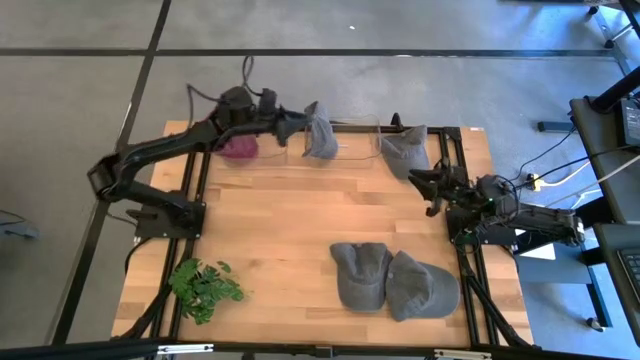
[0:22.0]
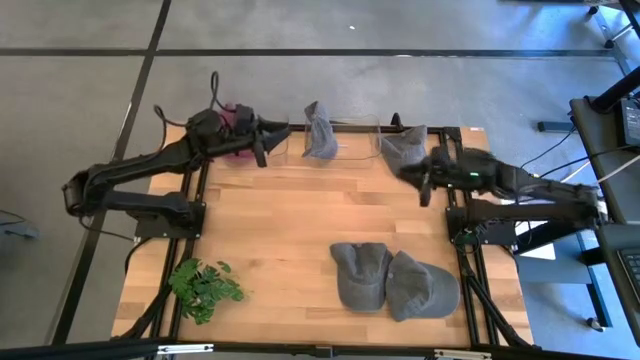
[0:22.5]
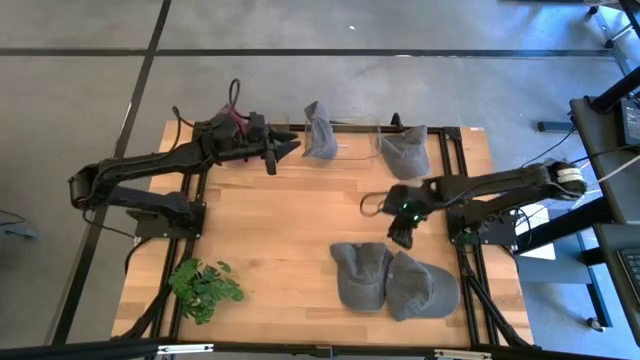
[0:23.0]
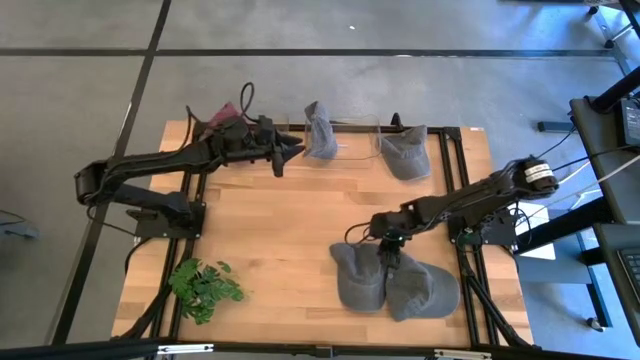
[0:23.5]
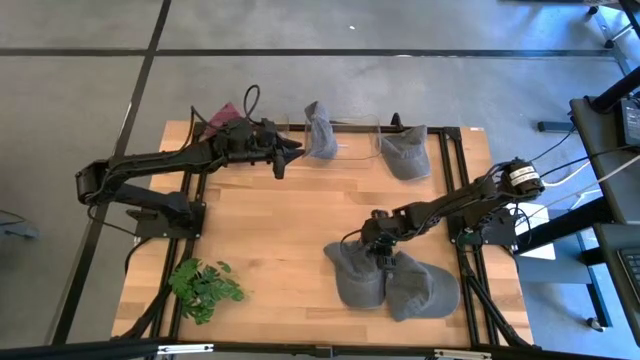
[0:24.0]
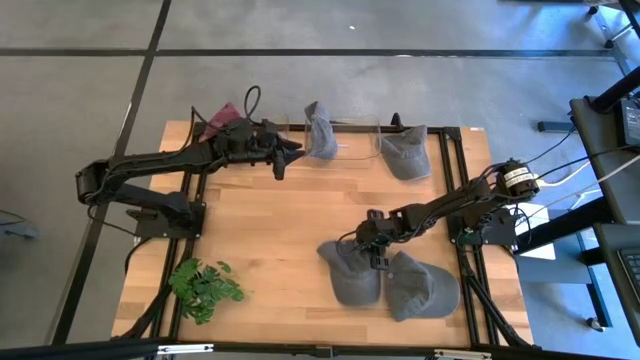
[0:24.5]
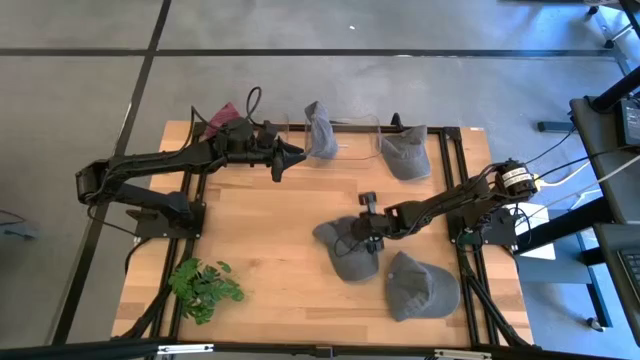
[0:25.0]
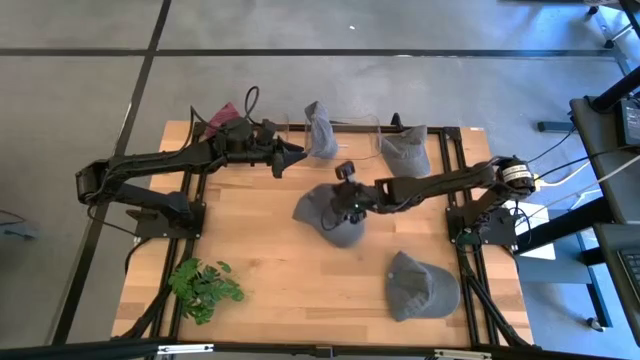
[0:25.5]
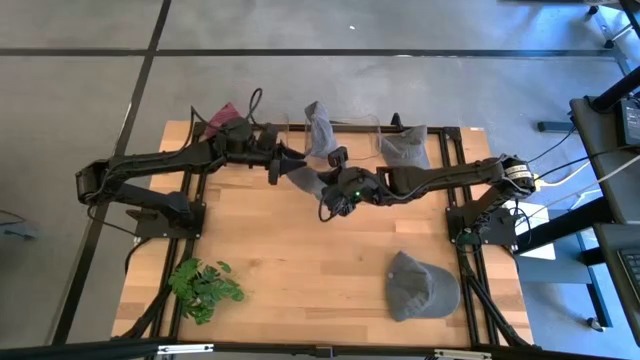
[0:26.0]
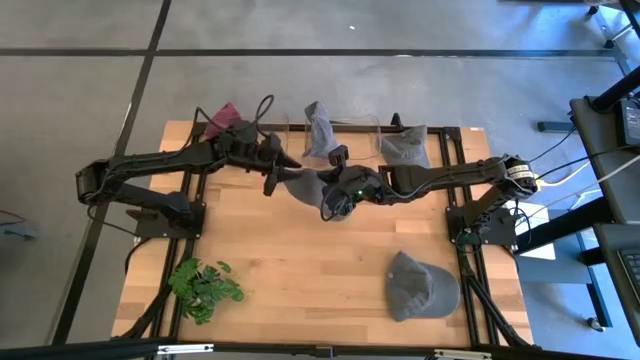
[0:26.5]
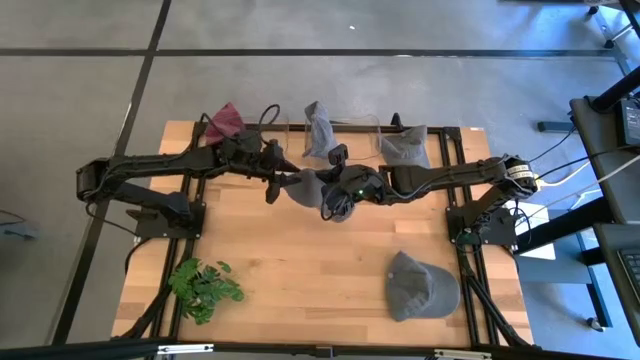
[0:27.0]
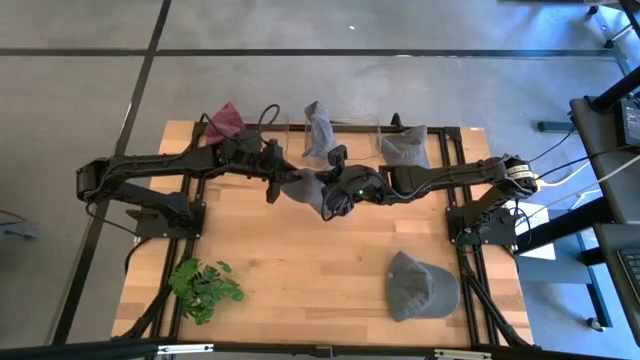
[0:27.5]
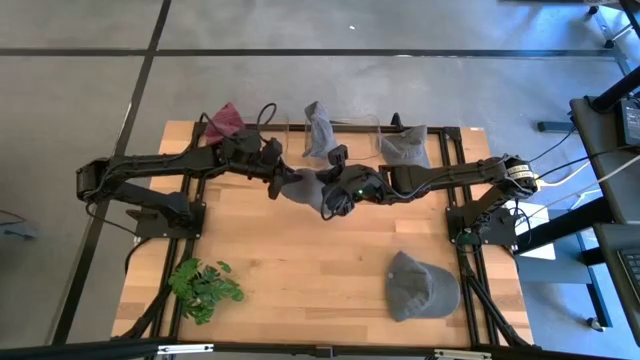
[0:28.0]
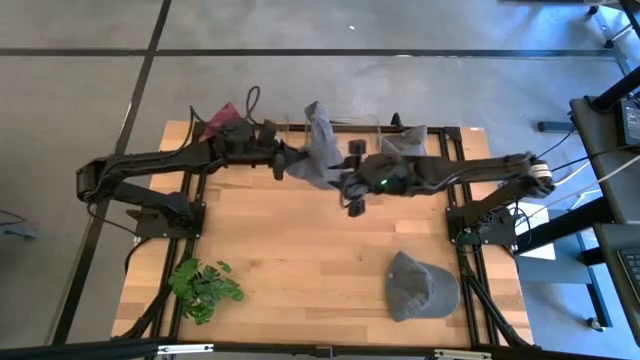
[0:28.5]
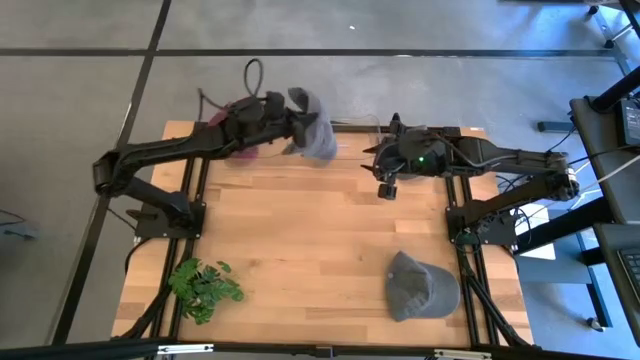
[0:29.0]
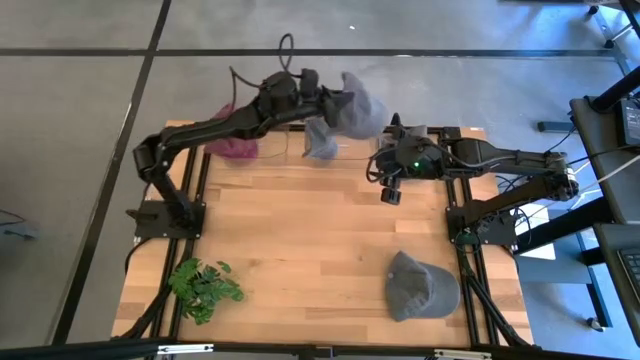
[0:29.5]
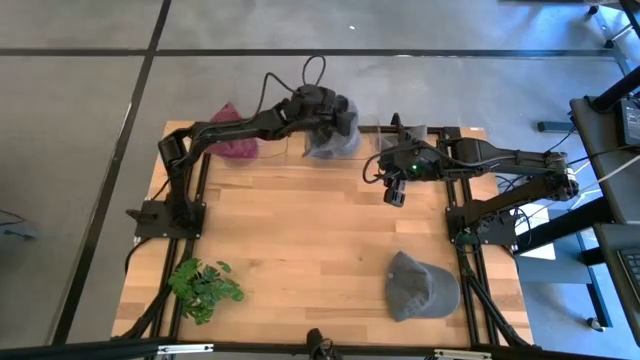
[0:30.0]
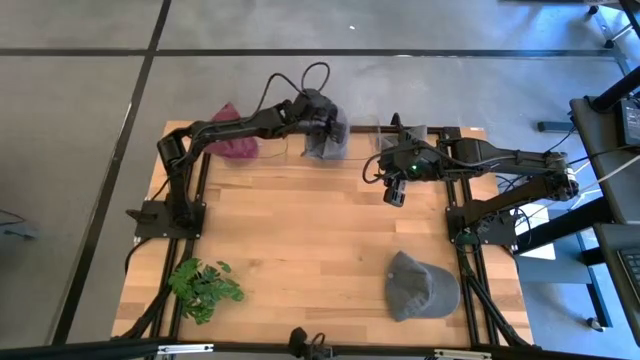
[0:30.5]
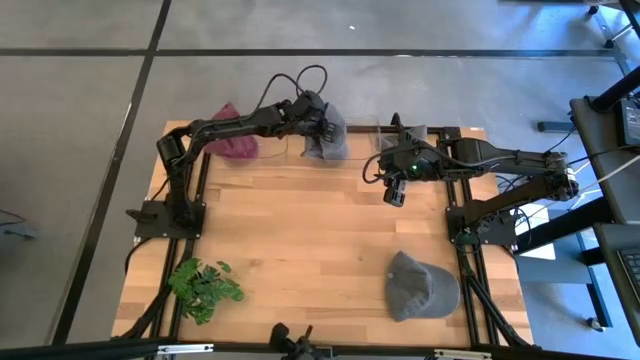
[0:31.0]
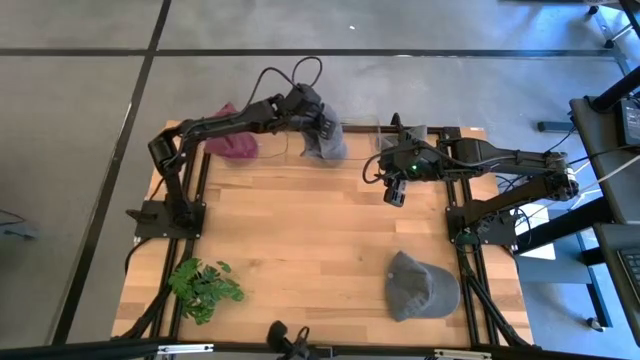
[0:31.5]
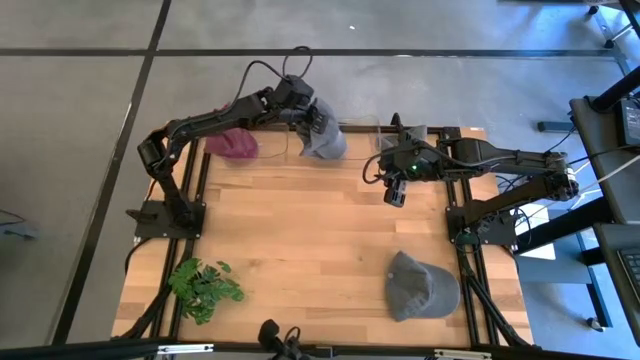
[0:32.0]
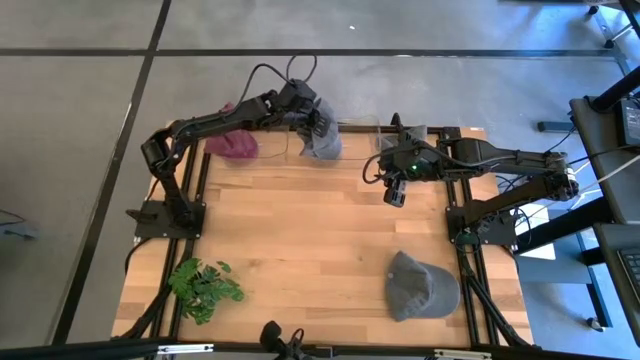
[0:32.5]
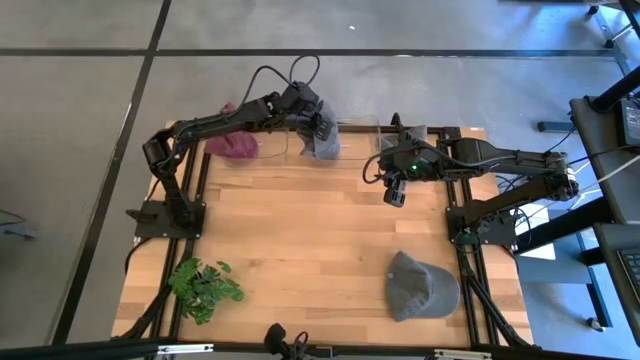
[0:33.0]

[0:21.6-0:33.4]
Task: Pick & Place hat
Put the gray cap into the right transparent bin

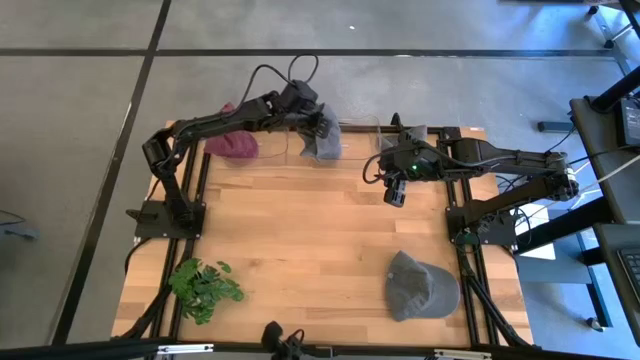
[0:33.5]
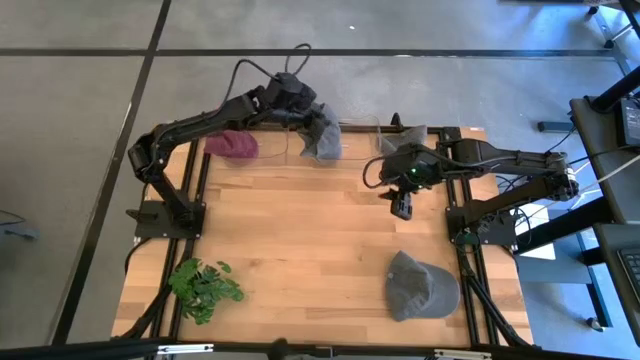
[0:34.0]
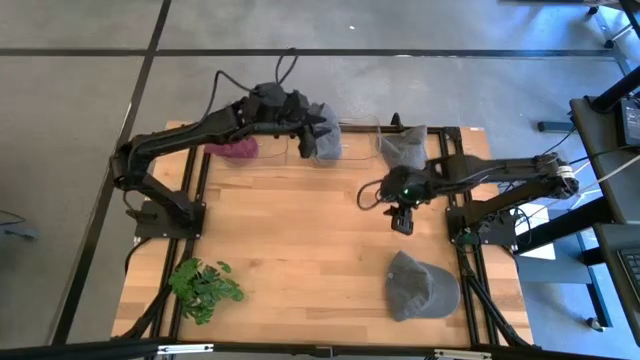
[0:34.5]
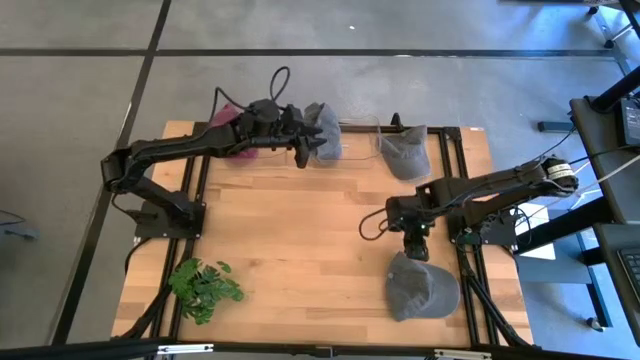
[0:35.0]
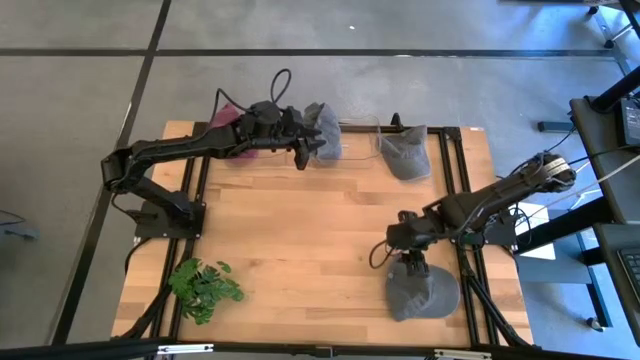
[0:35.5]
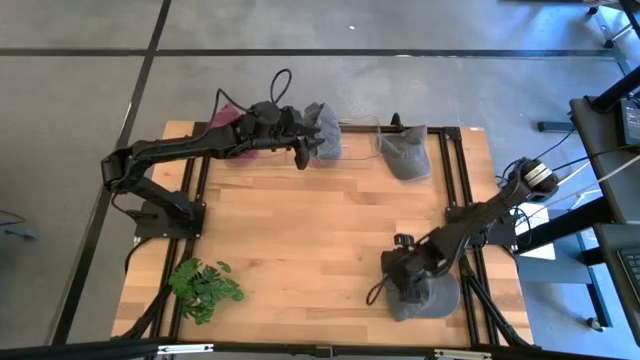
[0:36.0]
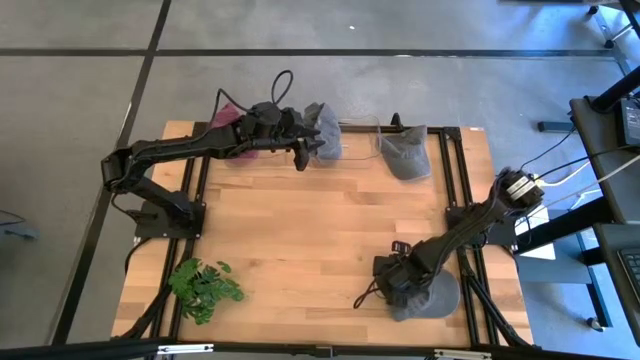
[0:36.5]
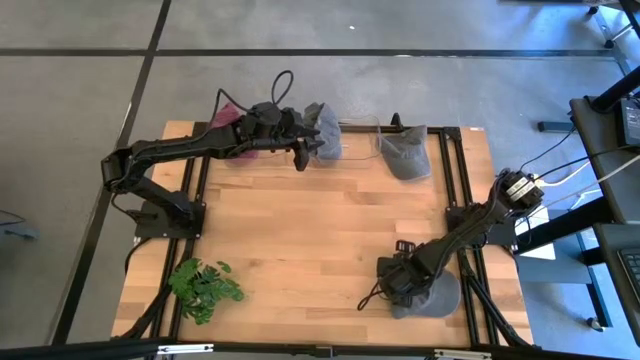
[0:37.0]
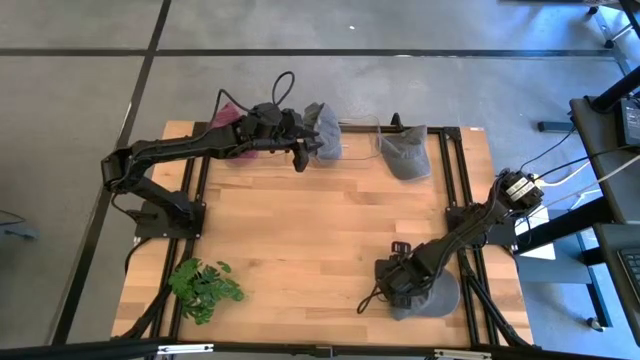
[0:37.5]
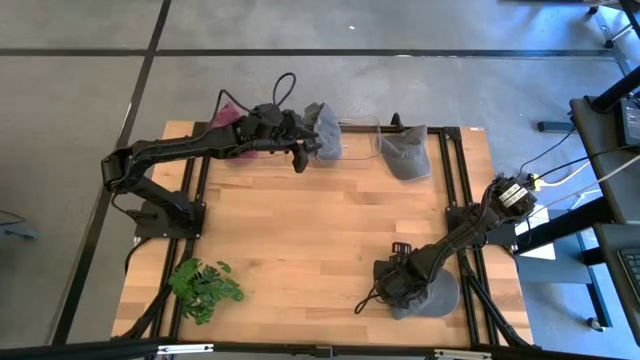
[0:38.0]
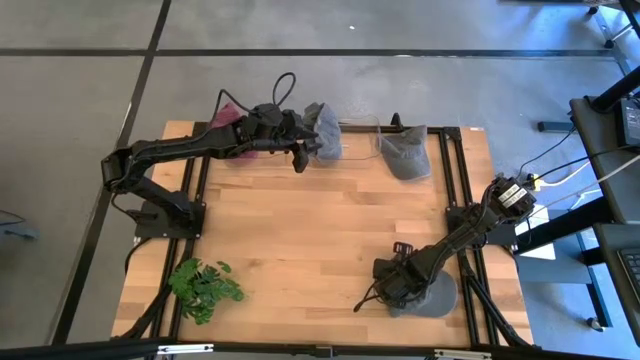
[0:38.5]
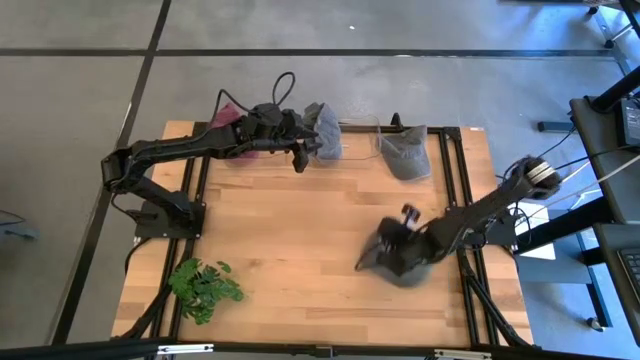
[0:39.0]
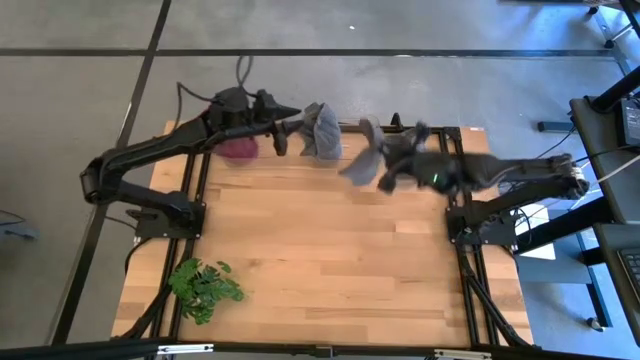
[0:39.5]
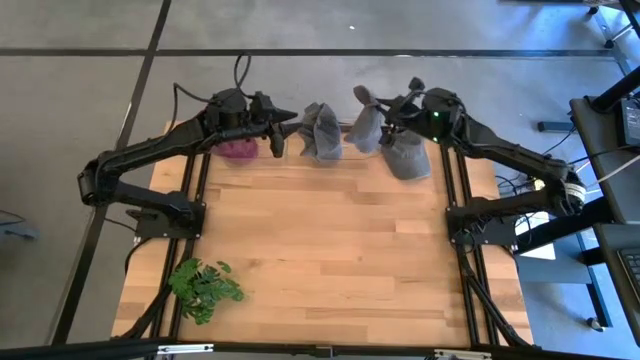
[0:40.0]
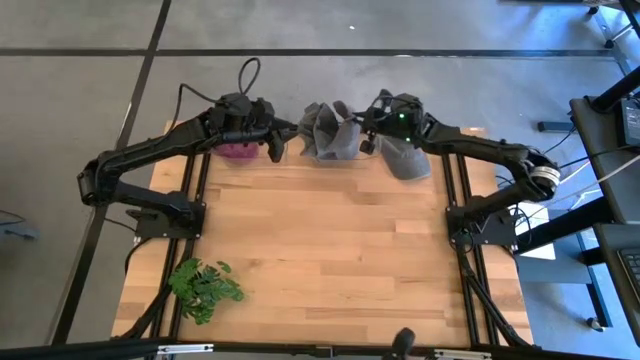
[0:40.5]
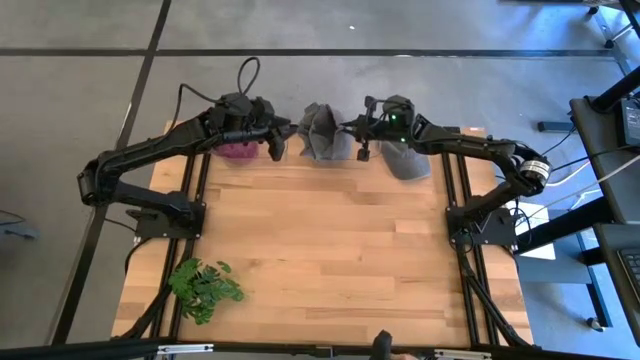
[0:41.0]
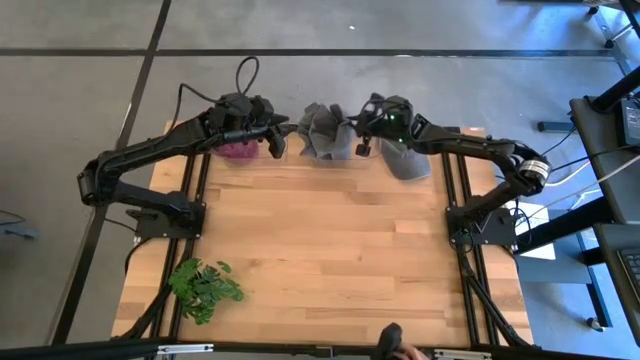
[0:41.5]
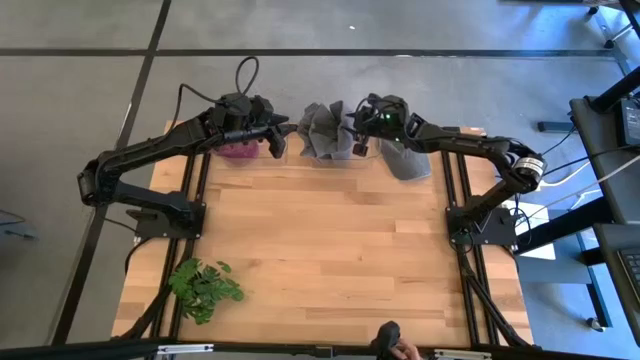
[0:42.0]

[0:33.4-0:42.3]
Put the gray cap into the right transparent bin
